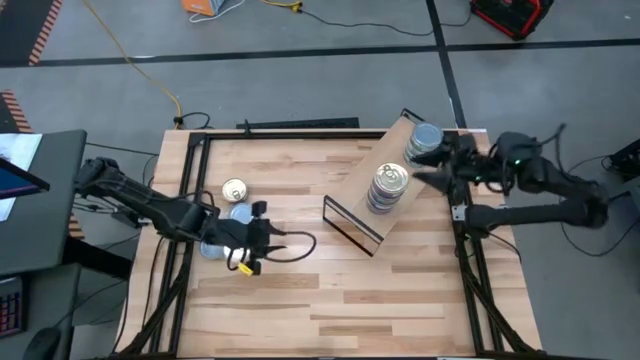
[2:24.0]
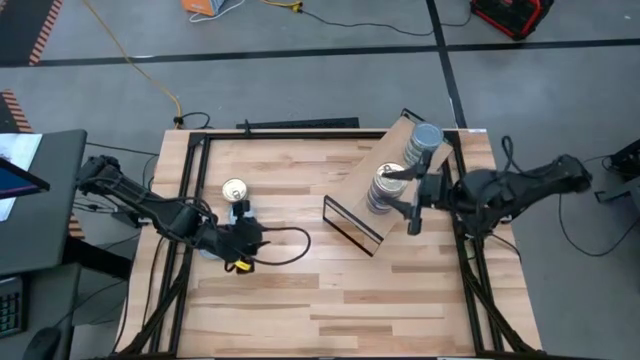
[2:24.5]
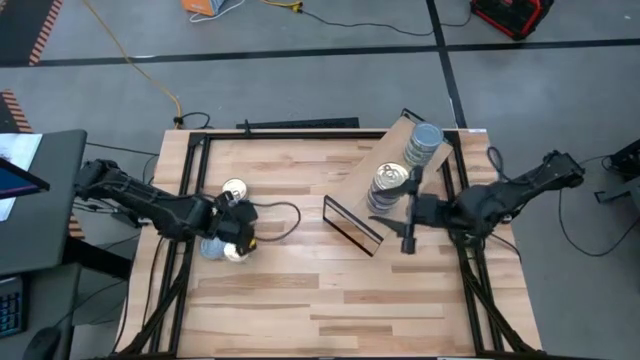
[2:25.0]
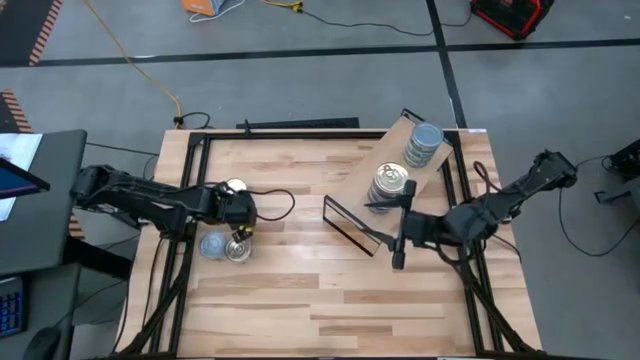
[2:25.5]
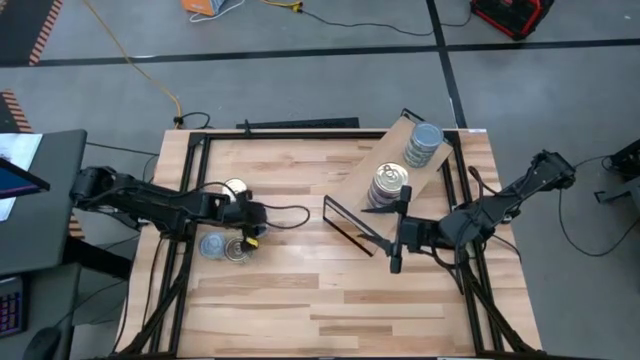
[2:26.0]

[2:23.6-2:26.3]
Task: Stack canned seafood by type on shelf
Move the green tuna can to the center of the table

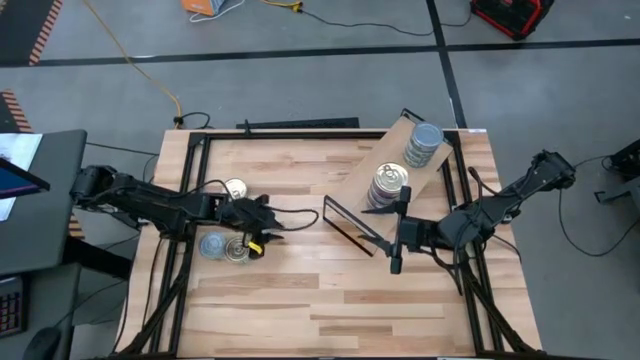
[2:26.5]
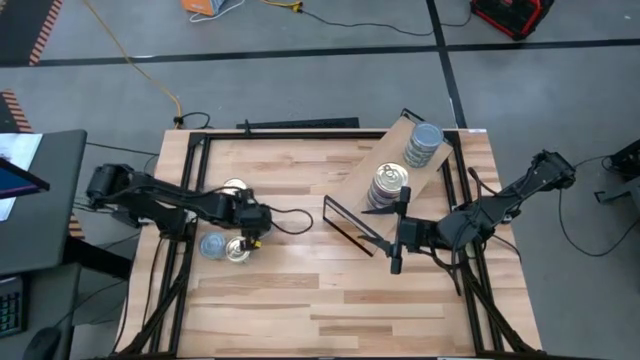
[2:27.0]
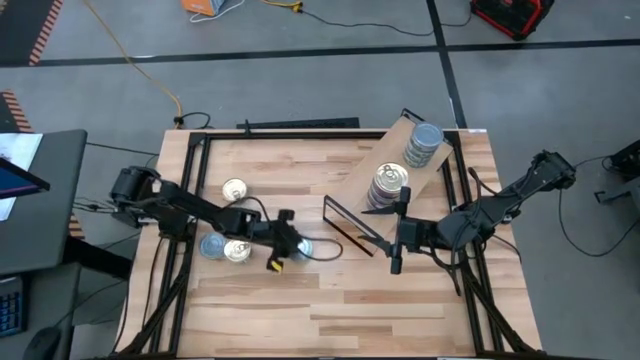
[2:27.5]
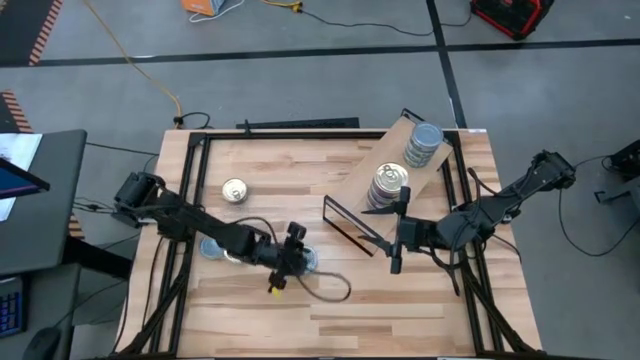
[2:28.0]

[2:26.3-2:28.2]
Move the green tuna can to the center of the table

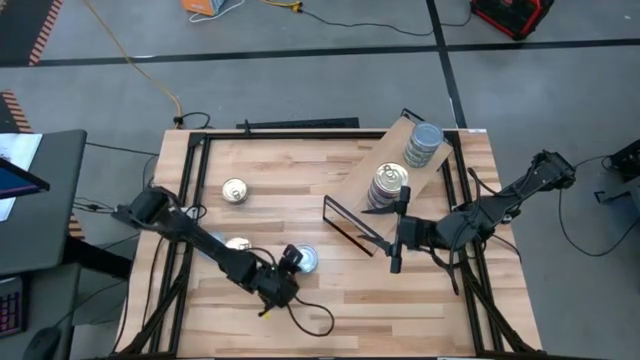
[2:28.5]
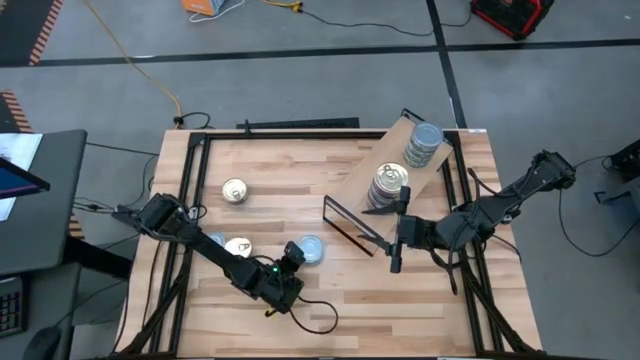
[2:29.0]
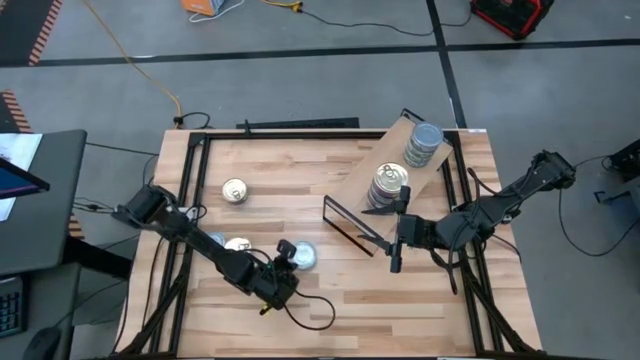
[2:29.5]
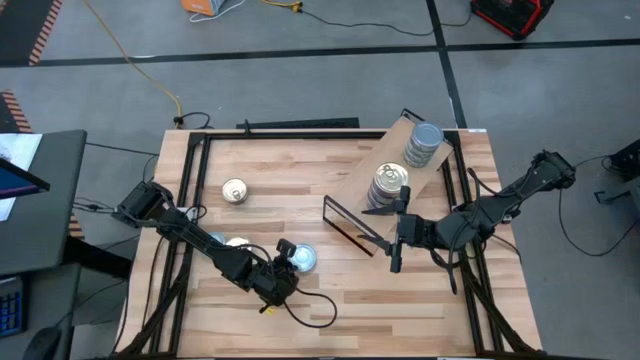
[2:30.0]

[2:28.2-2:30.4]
Stack the green tuna can on the shelf

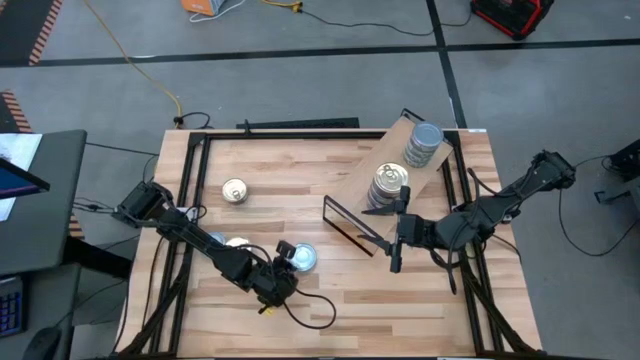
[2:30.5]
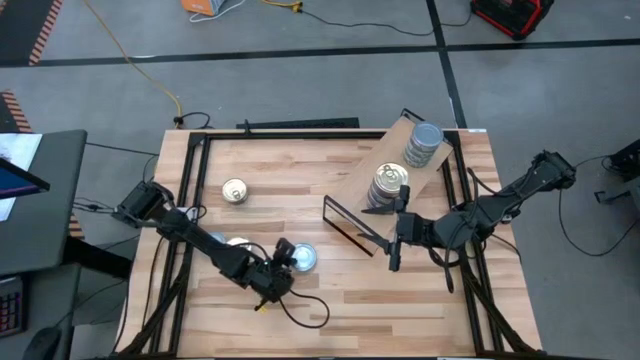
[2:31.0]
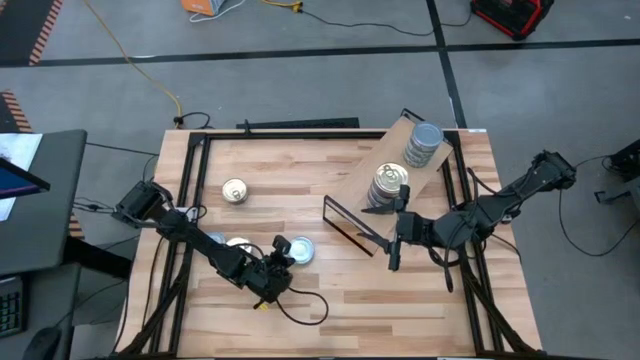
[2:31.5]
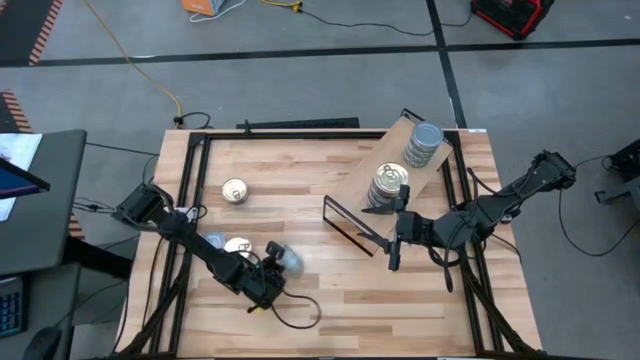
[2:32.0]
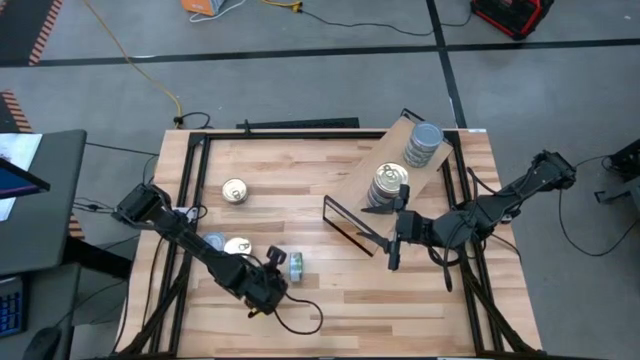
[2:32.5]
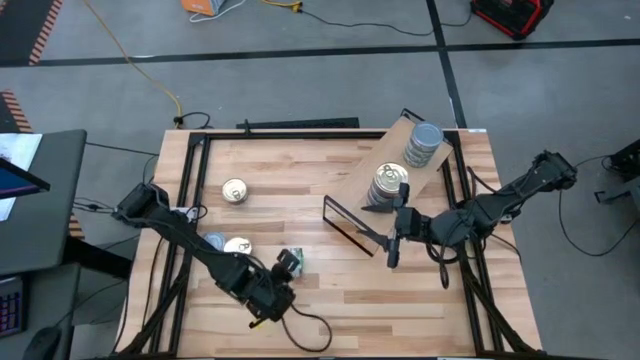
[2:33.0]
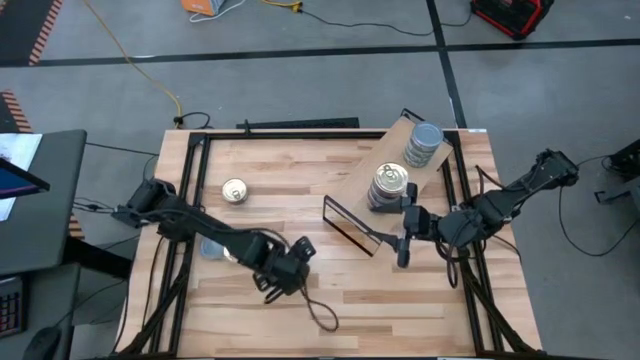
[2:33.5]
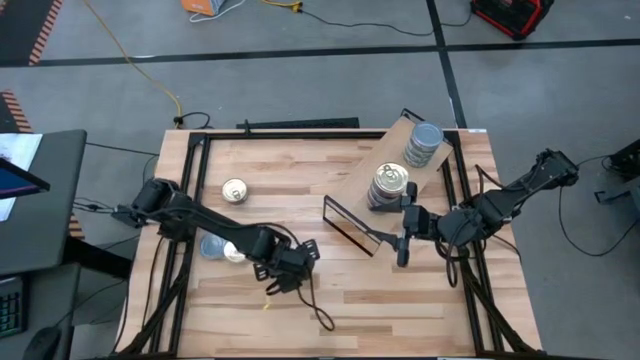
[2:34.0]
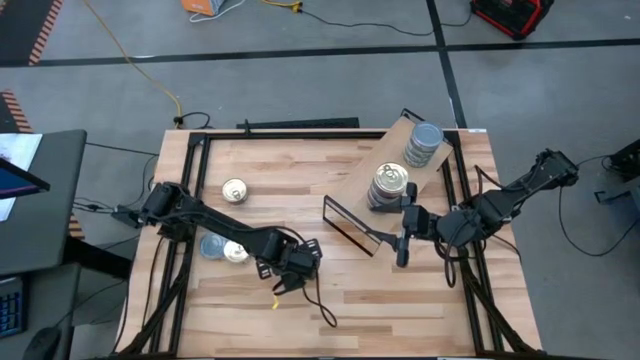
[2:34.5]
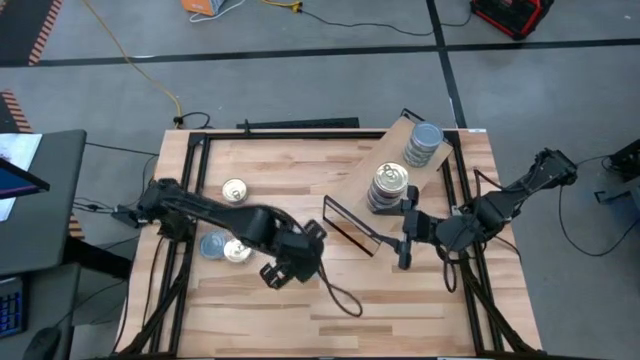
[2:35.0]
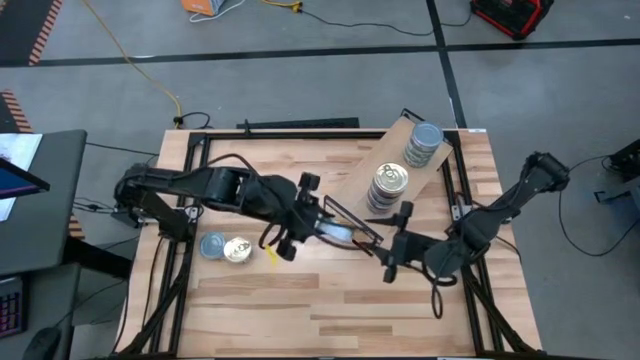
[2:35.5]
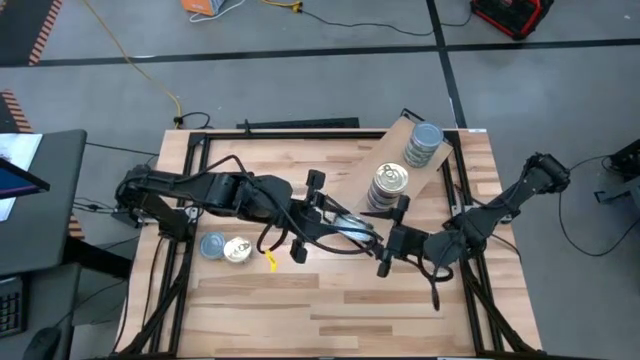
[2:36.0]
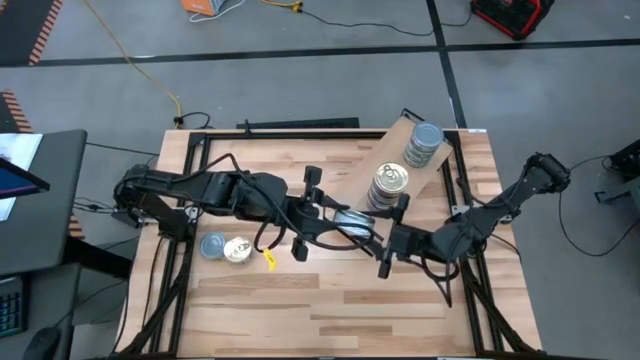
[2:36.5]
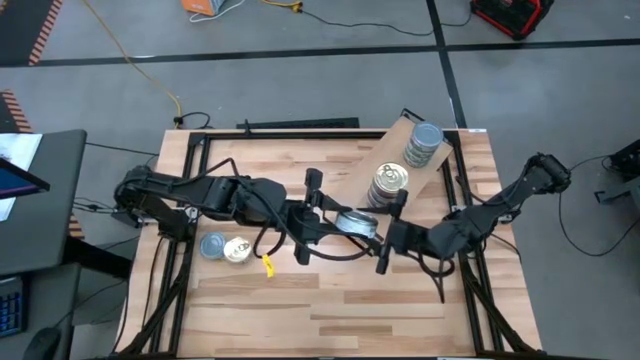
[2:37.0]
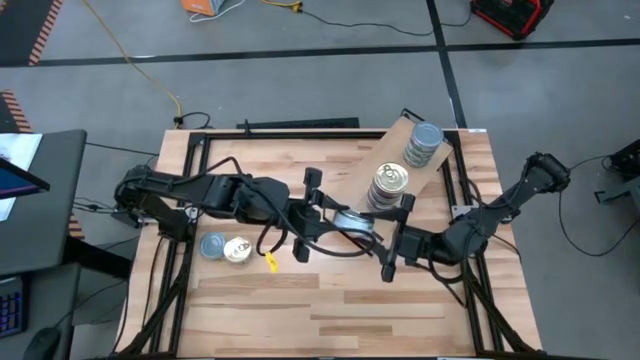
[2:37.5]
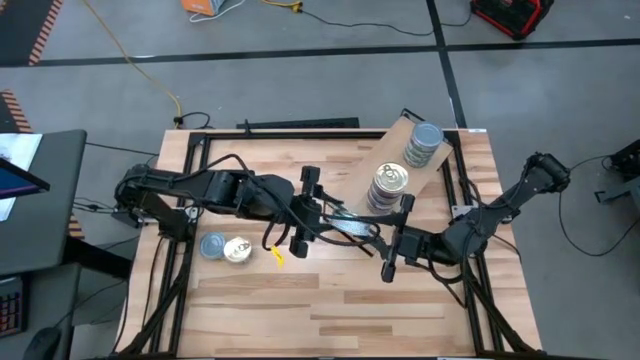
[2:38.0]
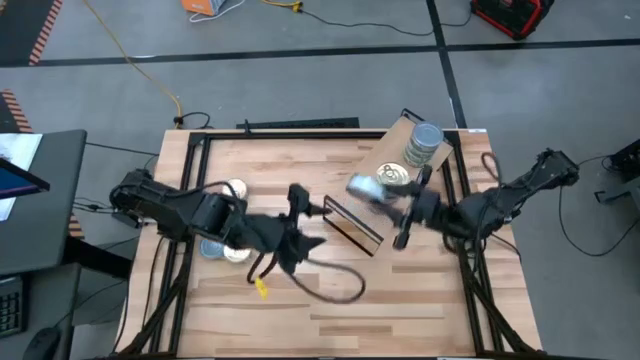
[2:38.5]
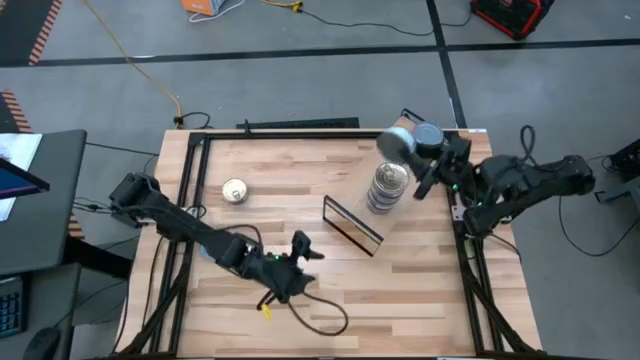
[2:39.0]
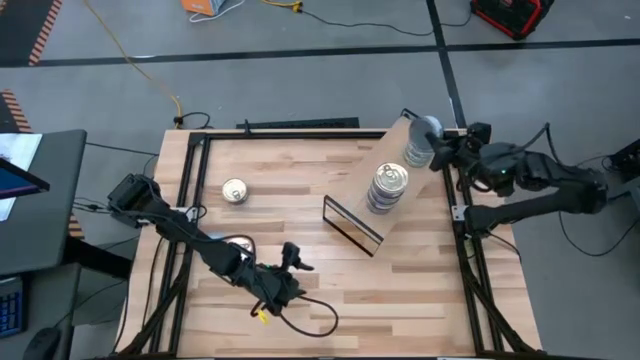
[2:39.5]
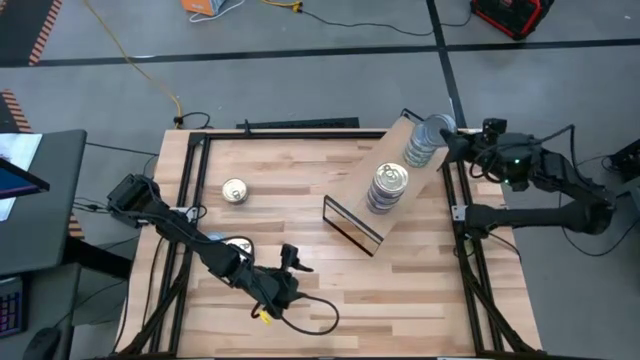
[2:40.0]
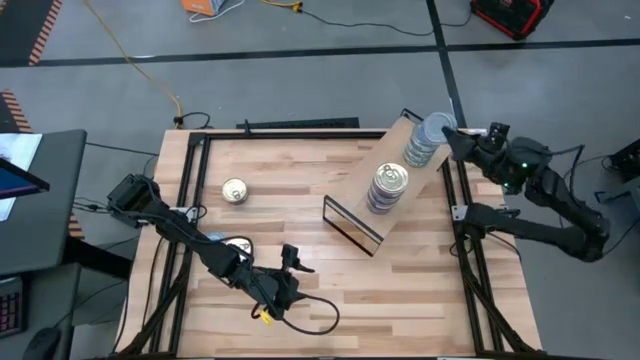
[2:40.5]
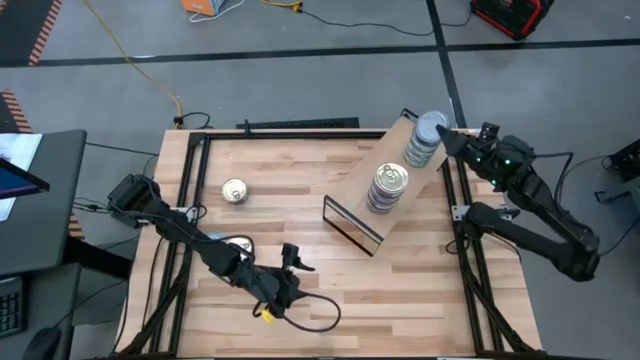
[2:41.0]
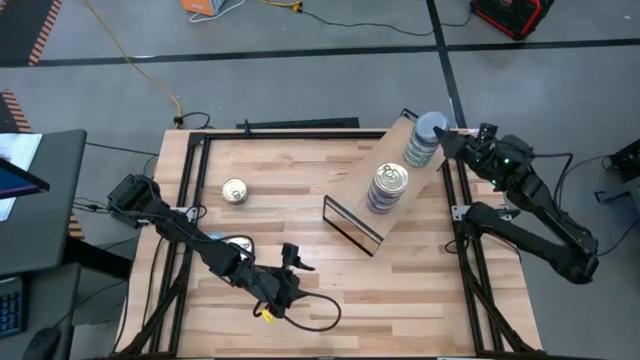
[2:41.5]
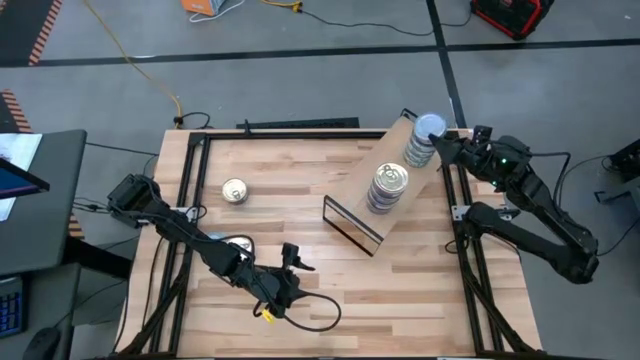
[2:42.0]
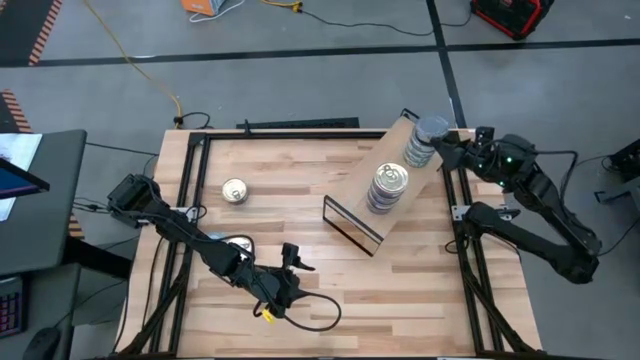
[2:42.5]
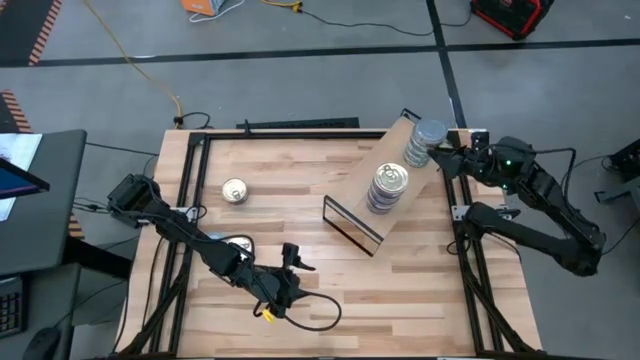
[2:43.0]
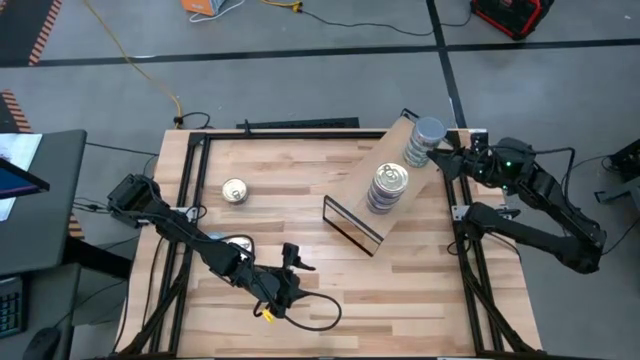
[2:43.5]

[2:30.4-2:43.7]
Stack the green tuna can on the shelf

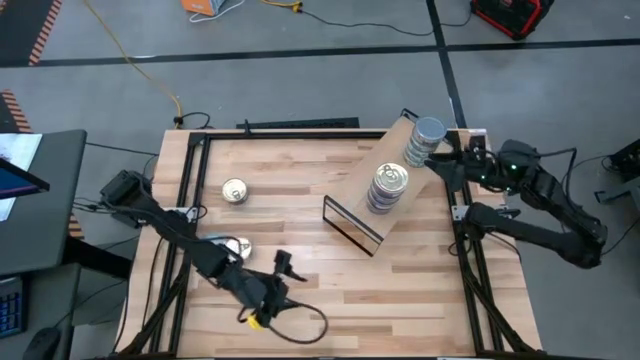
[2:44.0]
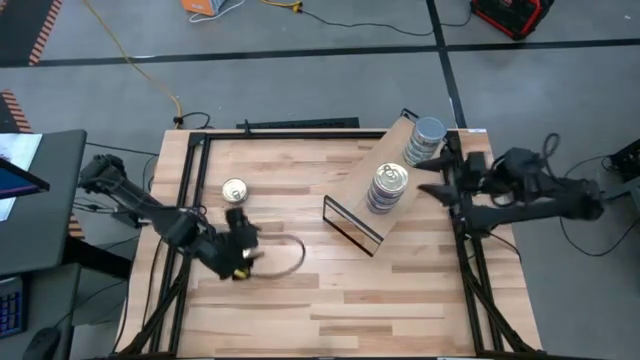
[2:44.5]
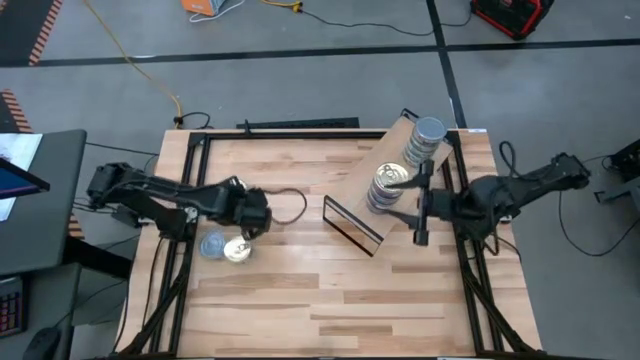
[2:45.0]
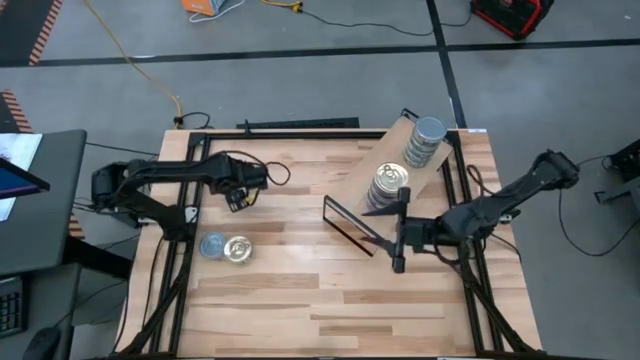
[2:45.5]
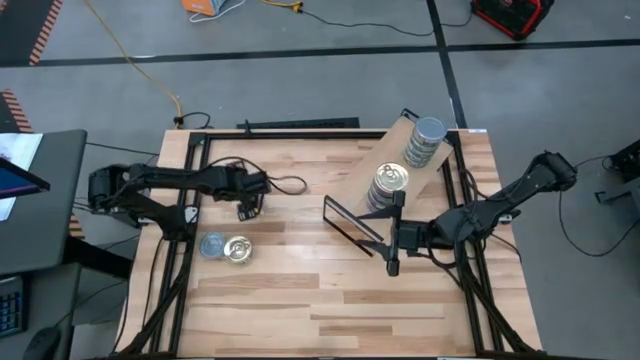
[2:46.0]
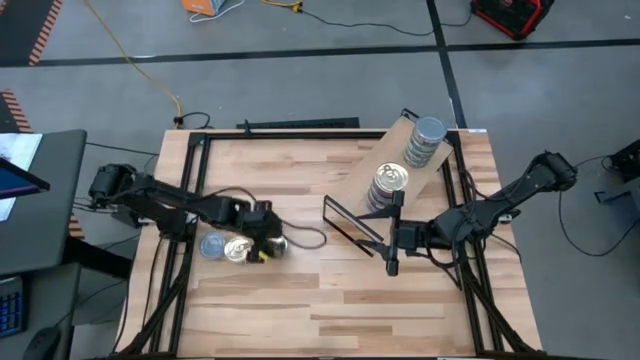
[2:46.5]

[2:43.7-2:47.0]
Move the blue and pink tuna can to the center of the table
